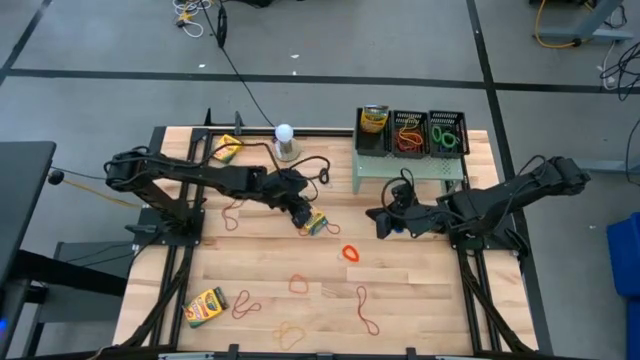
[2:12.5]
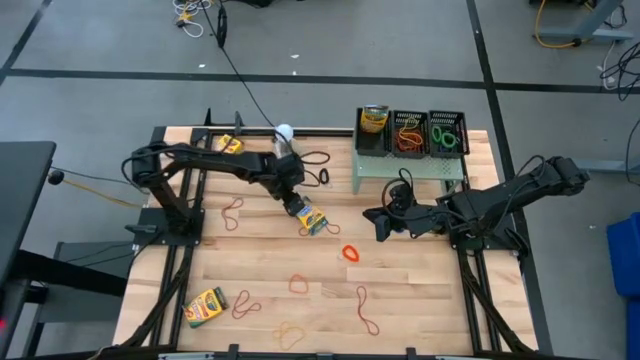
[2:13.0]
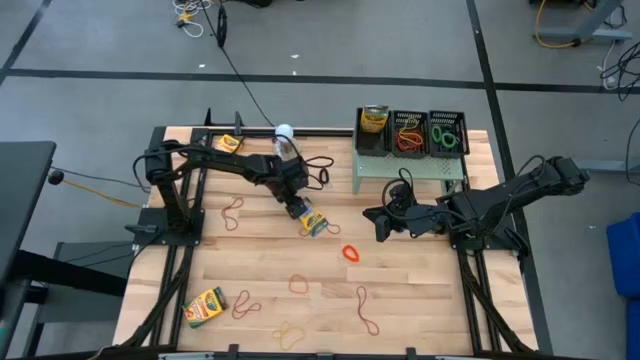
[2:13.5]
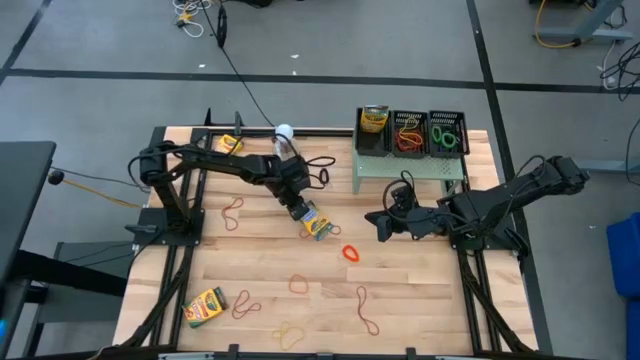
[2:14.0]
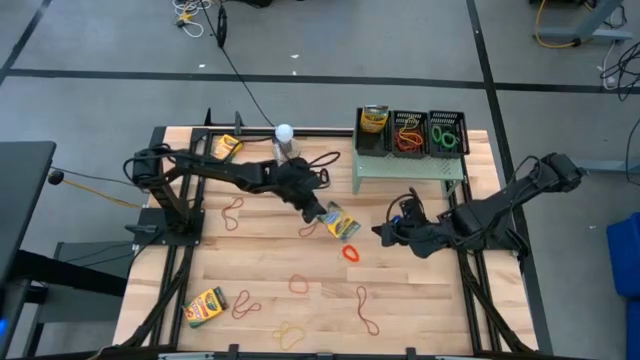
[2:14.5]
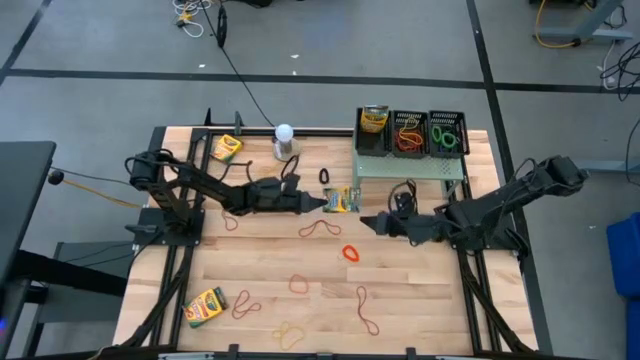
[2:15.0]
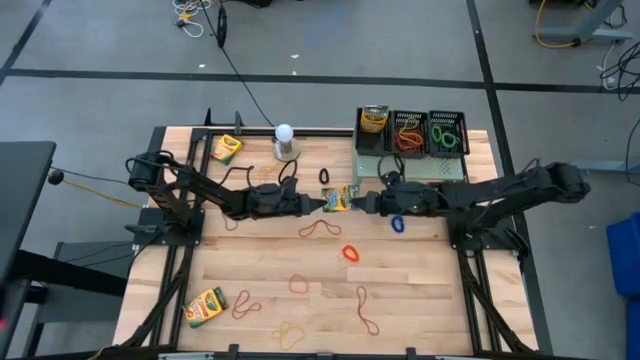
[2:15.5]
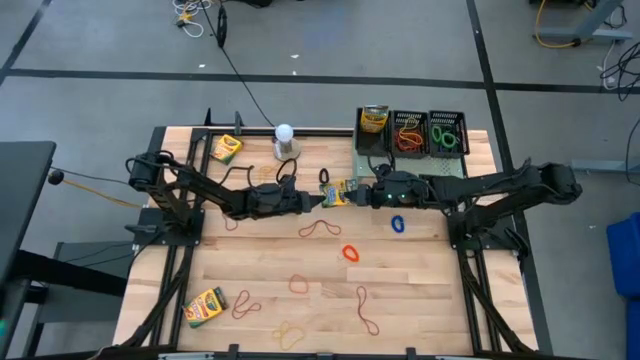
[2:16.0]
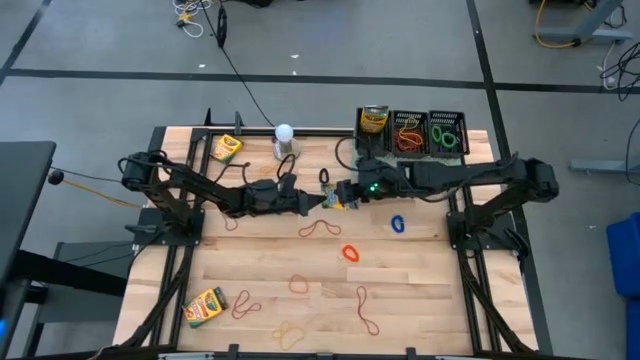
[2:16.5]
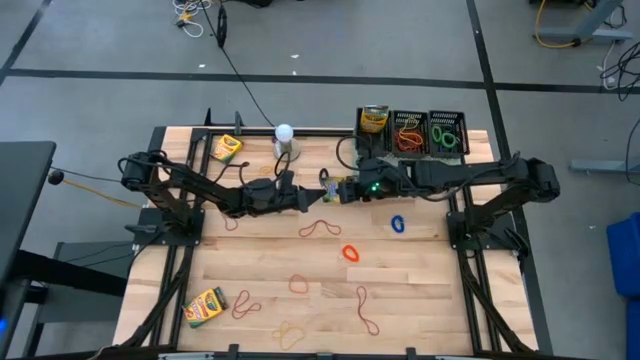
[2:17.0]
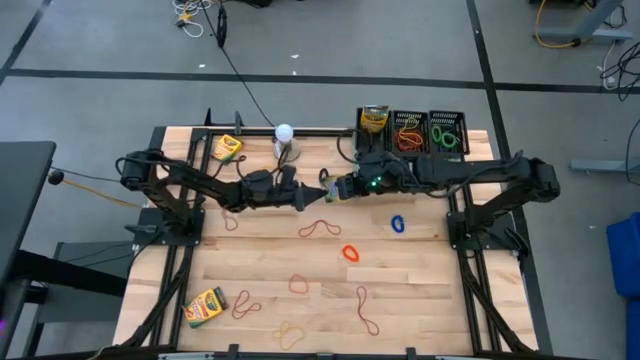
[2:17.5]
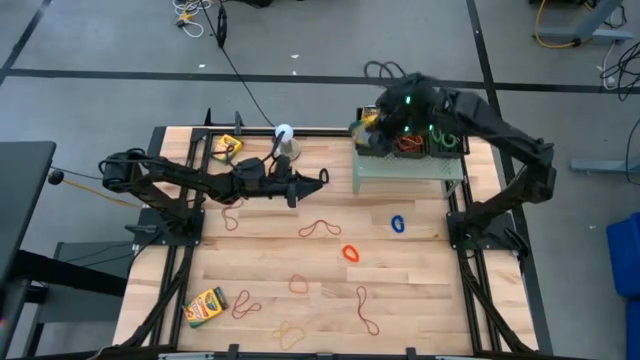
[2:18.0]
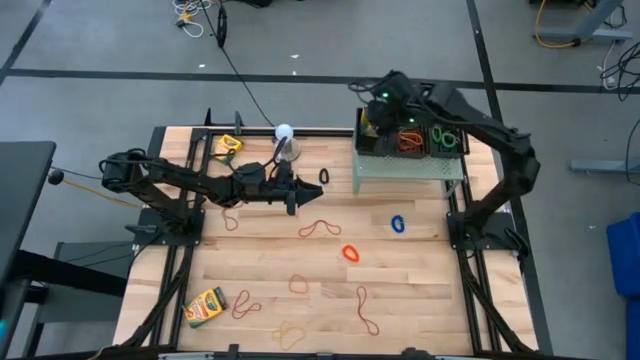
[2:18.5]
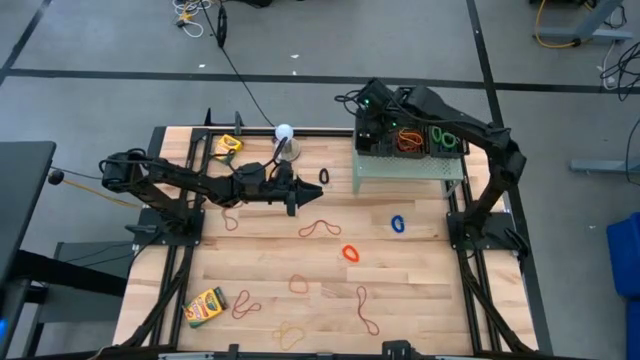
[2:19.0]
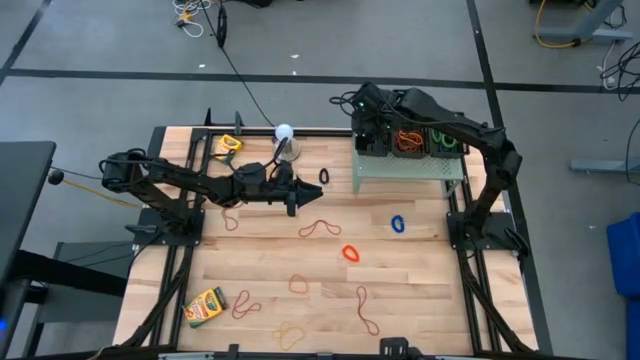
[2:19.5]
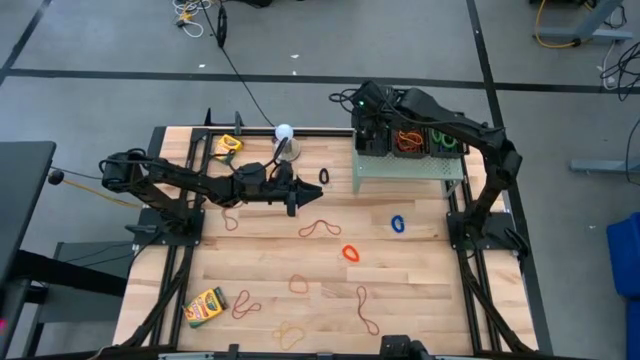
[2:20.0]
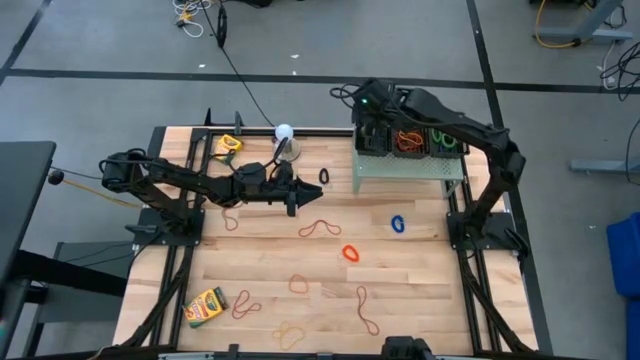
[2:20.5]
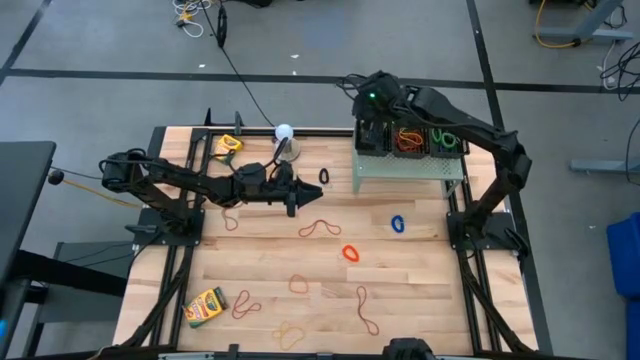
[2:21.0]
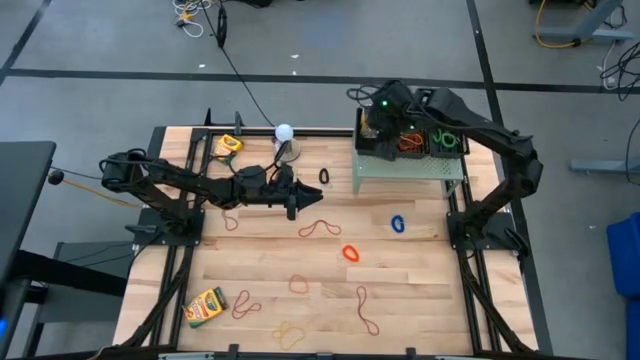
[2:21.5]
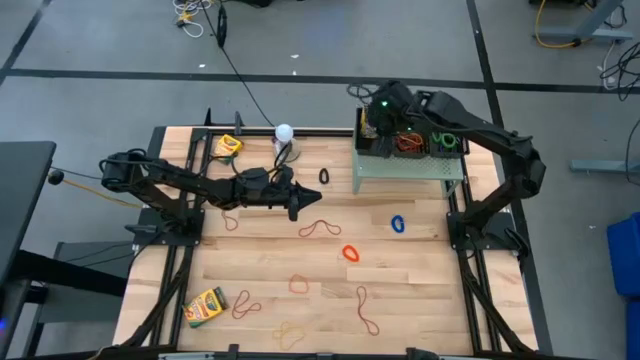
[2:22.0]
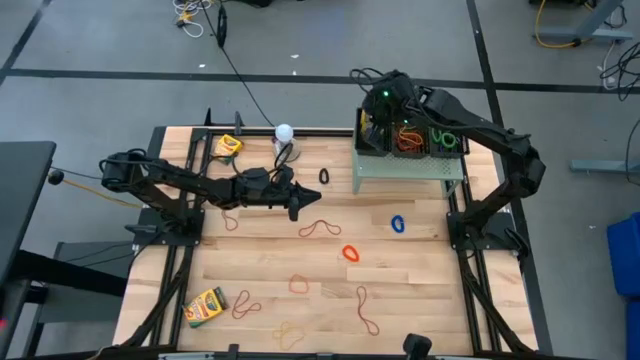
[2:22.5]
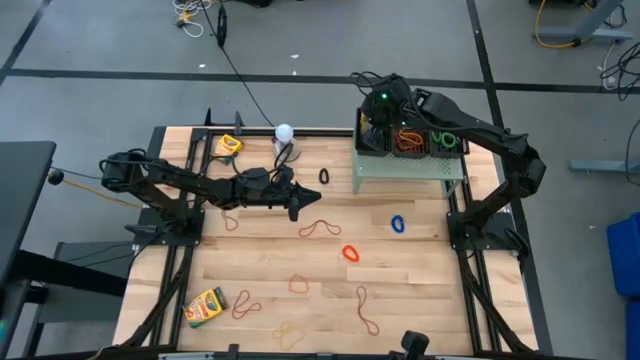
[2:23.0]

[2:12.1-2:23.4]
Task: Pick & Place Office Desk Supplies
Put the right crayon box into the left basket on the shelf

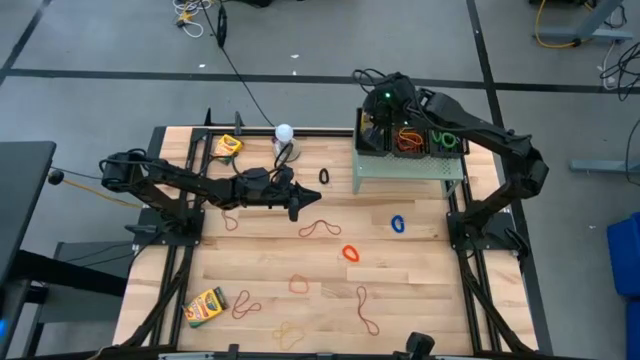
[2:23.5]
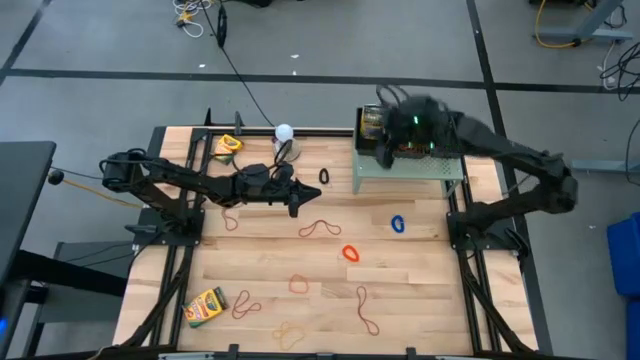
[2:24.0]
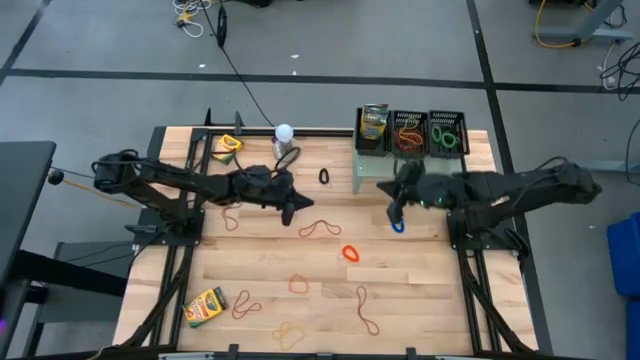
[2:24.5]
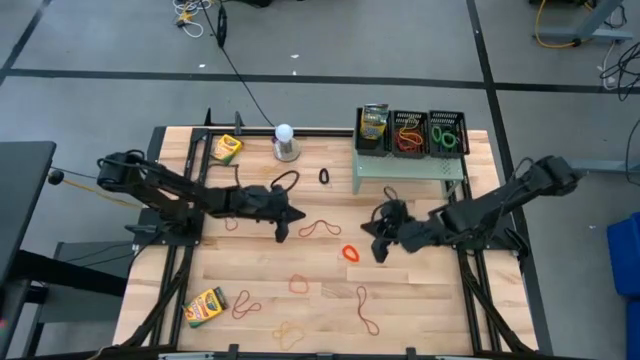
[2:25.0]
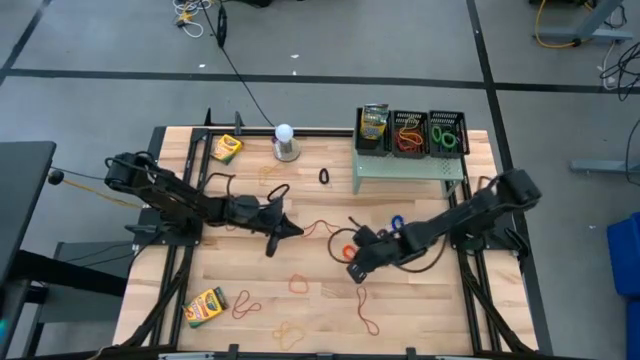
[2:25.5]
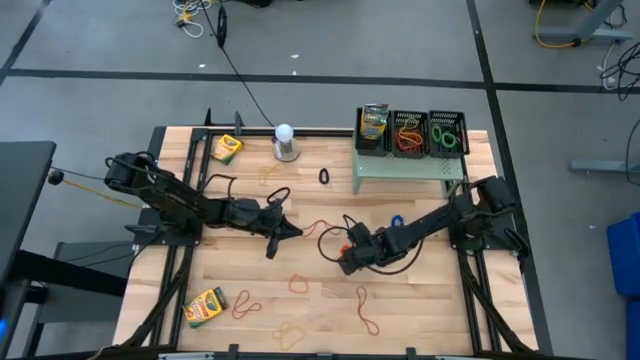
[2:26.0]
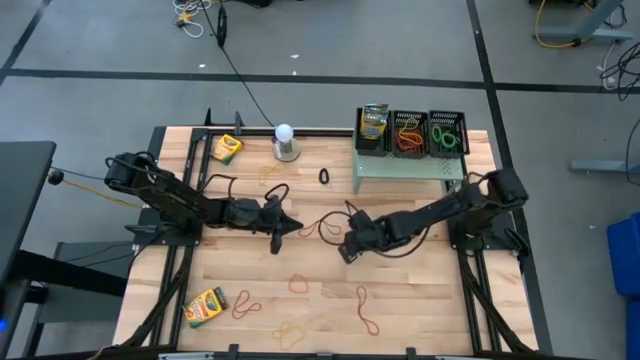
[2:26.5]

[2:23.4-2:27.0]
Put the orange spring keychain into the right basket on the shelf

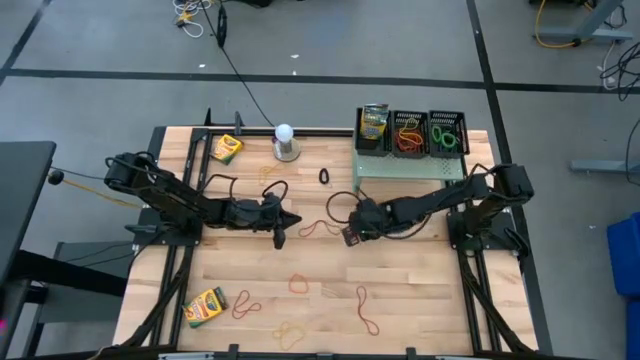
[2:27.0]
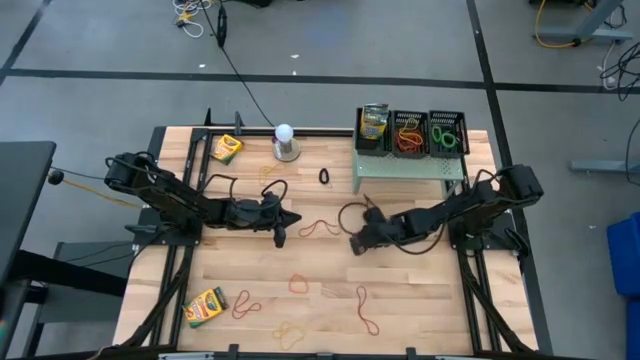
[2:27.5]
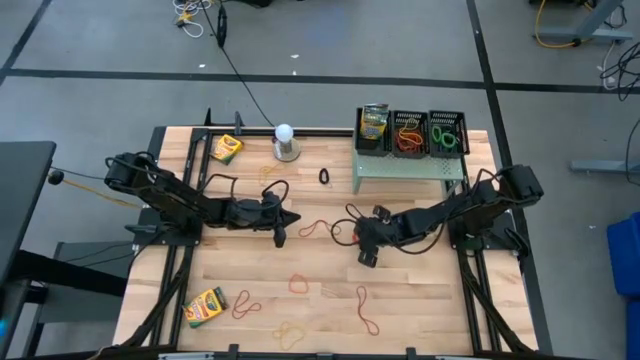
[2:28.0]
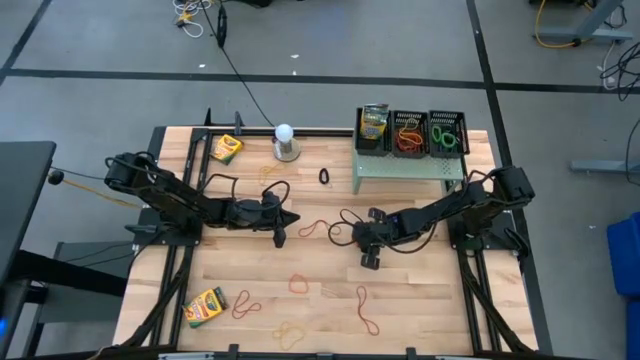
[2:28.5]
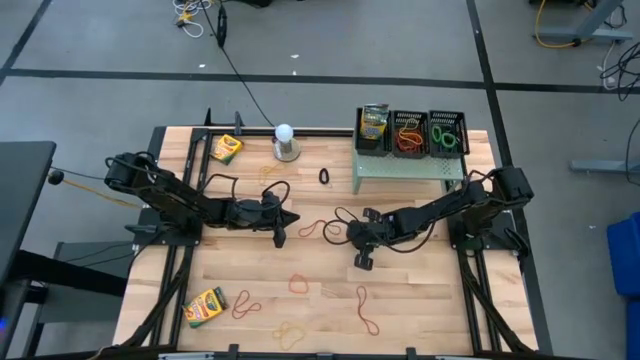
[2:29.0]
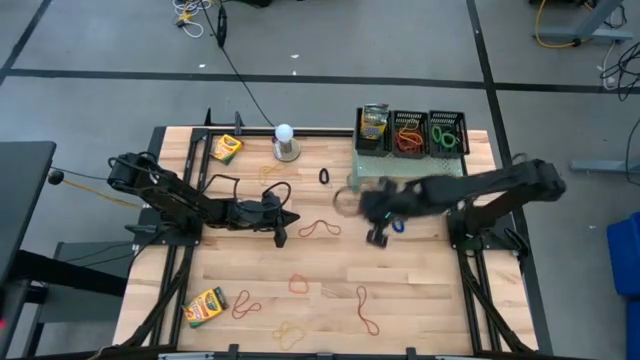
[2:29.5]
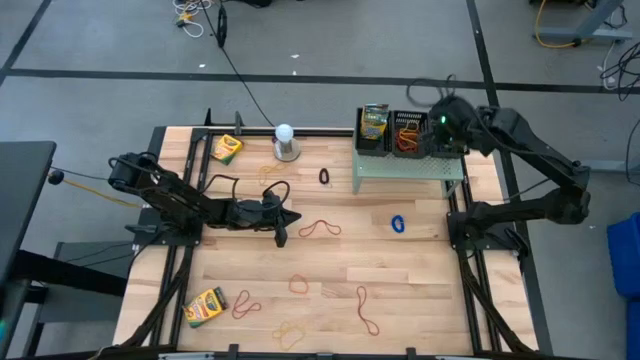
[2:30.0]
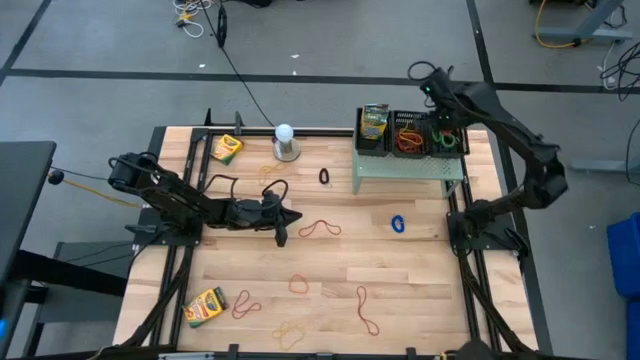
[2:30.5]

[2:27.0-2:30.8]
Put the orange spring keychain into the right basket on the shelf

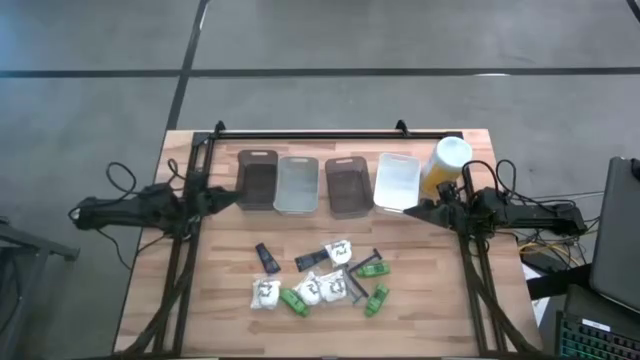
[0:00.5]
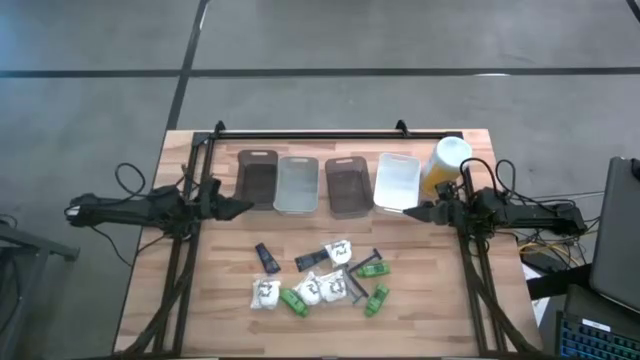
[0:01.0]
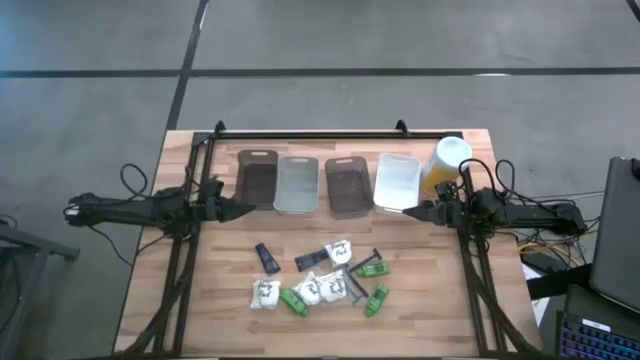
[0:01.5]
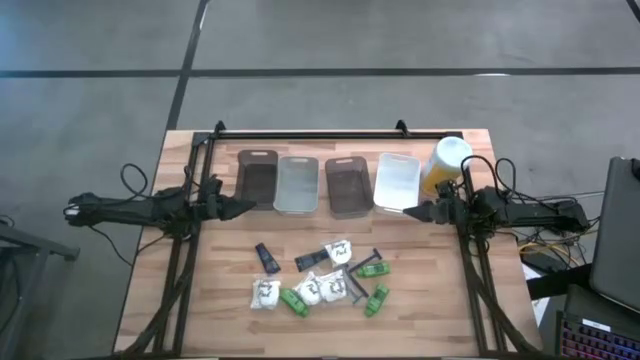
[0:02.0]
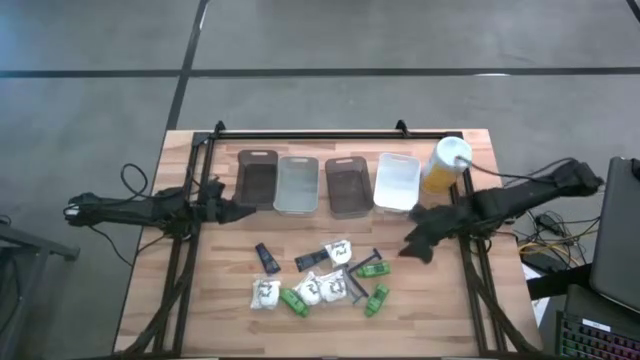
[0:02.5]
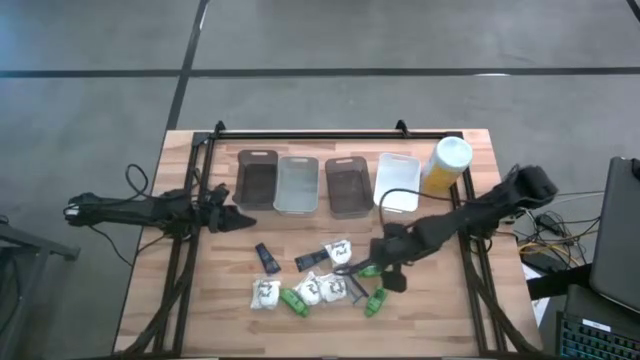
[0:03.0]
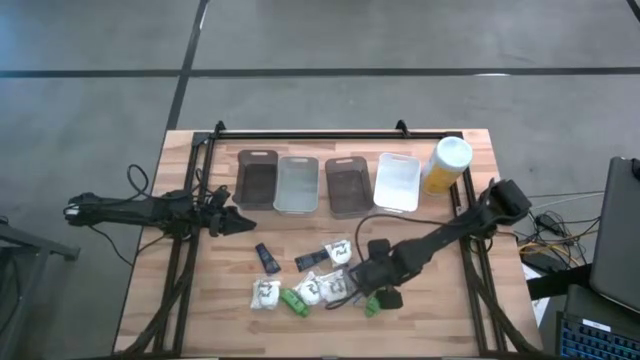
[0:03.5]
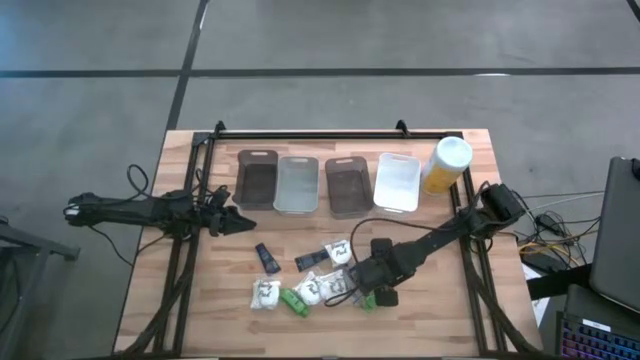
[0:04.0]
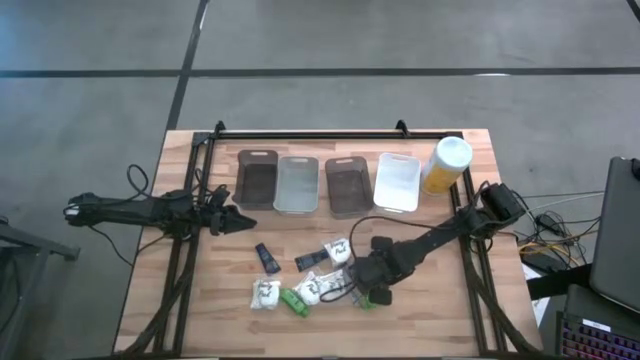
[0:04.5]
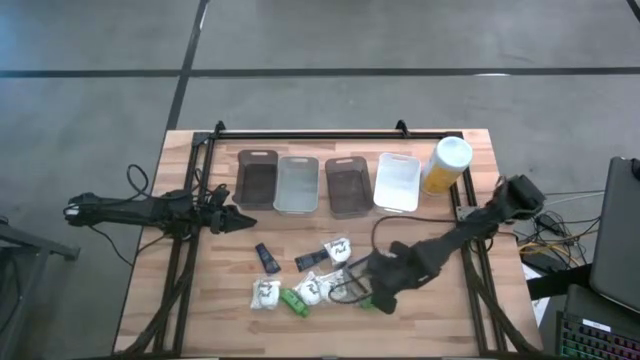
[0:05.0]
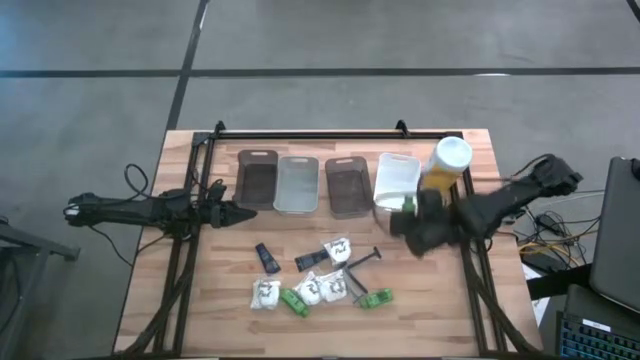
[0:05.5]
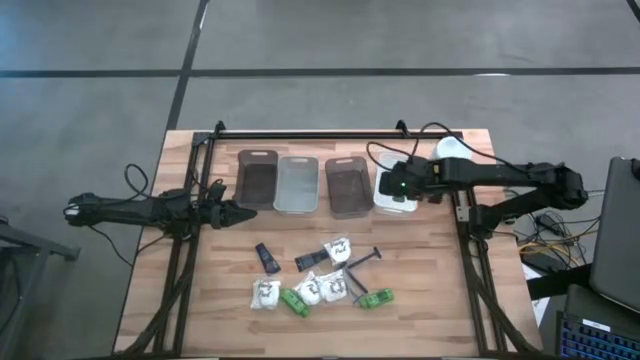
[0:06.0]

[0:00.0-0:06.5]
Task: Pick & Place Travel size toiletries
Put the green shampoo into the white bin
